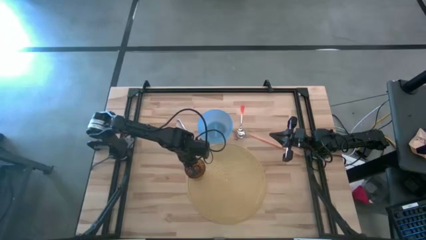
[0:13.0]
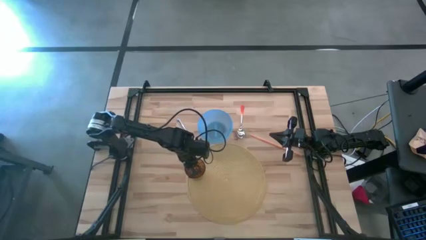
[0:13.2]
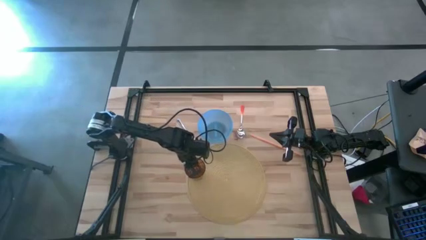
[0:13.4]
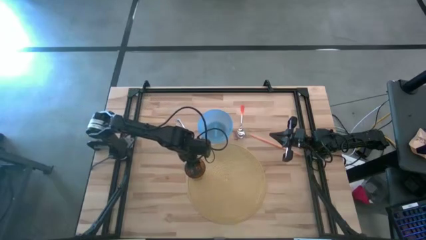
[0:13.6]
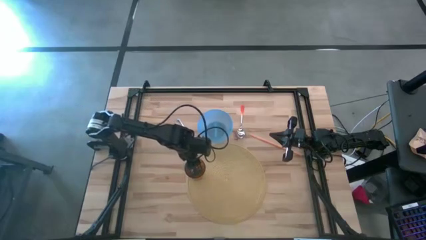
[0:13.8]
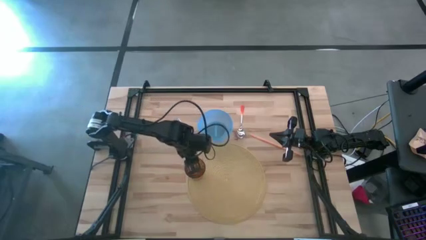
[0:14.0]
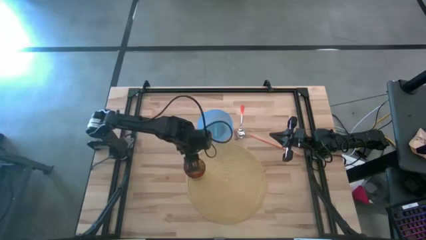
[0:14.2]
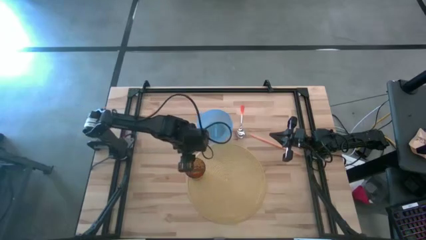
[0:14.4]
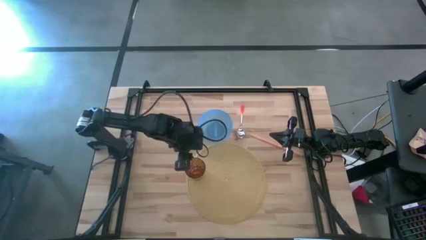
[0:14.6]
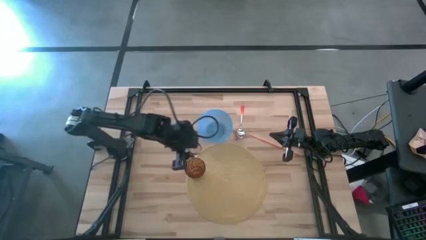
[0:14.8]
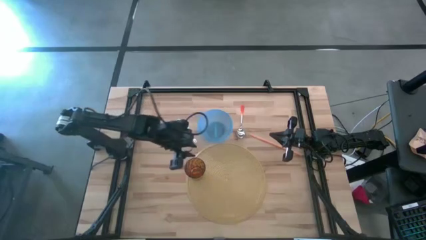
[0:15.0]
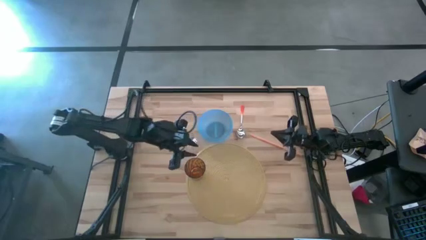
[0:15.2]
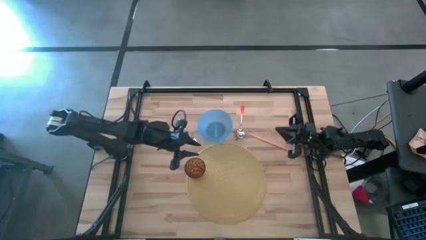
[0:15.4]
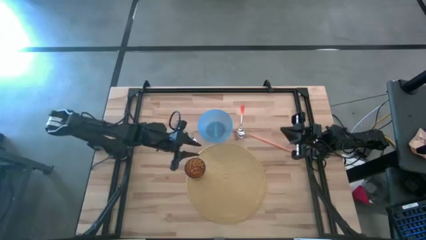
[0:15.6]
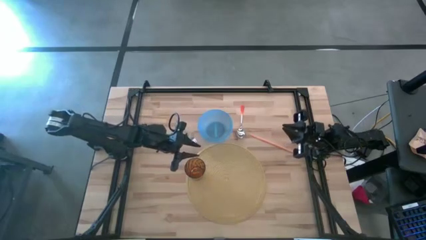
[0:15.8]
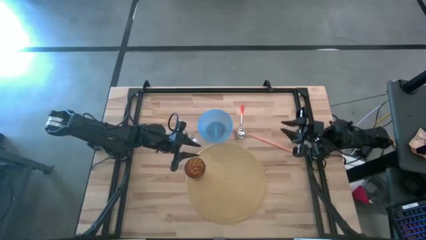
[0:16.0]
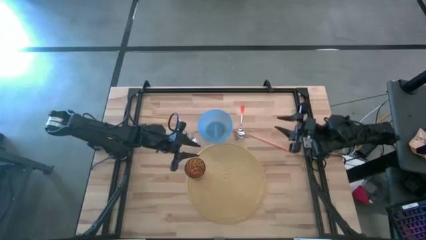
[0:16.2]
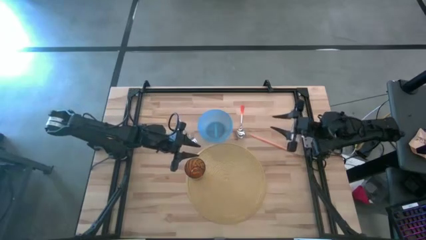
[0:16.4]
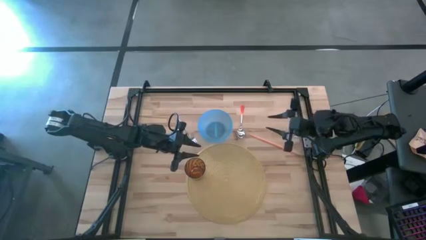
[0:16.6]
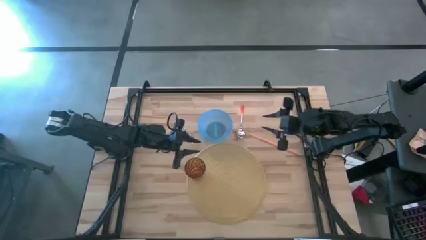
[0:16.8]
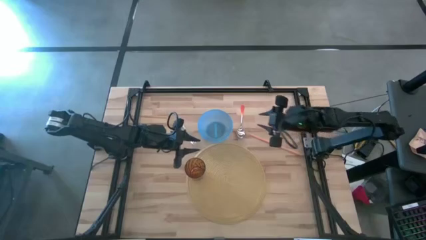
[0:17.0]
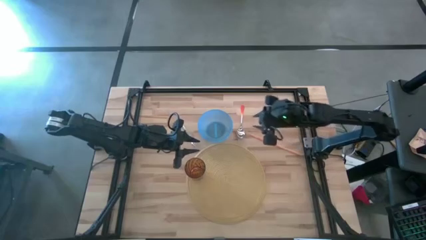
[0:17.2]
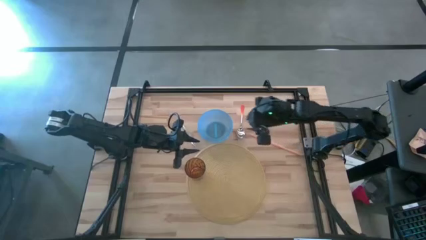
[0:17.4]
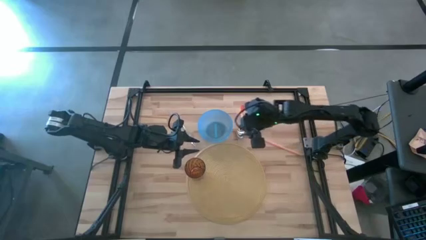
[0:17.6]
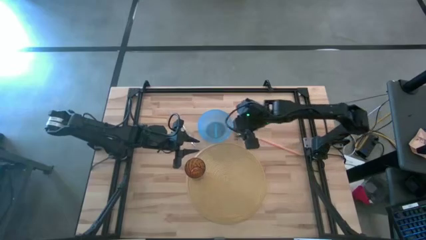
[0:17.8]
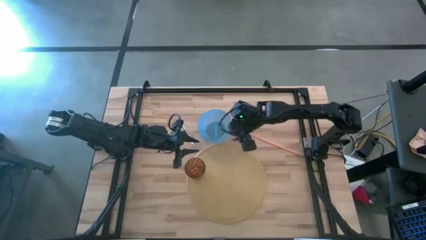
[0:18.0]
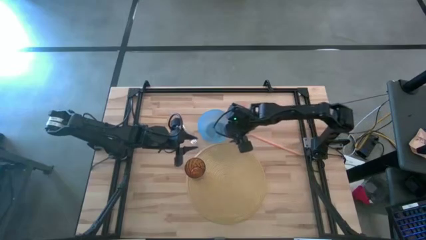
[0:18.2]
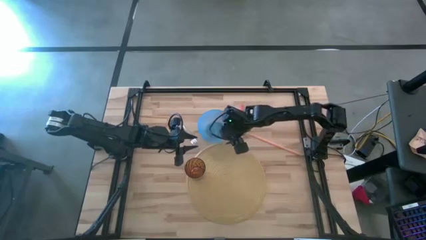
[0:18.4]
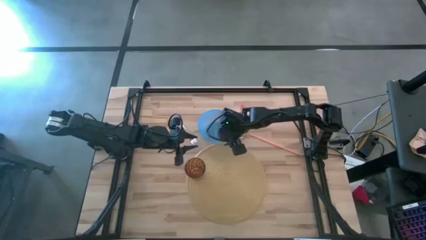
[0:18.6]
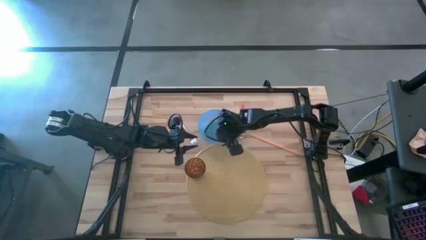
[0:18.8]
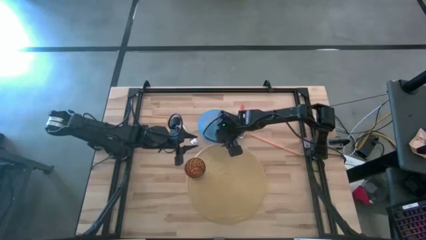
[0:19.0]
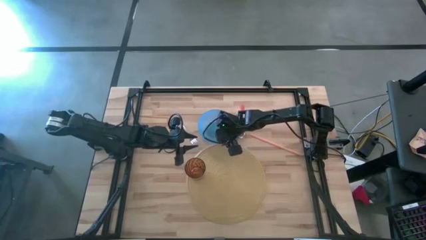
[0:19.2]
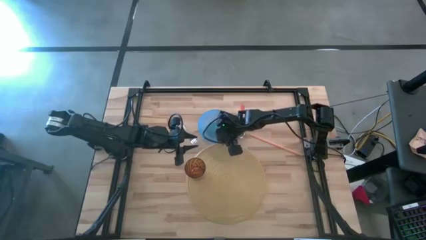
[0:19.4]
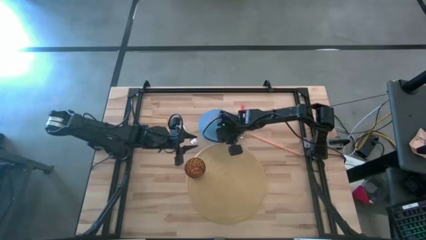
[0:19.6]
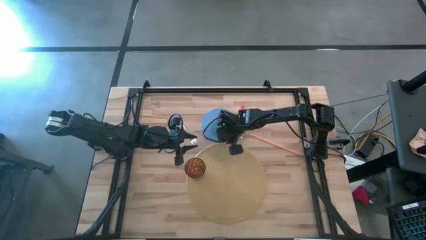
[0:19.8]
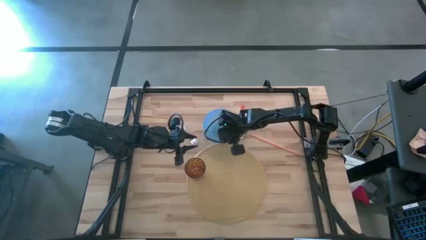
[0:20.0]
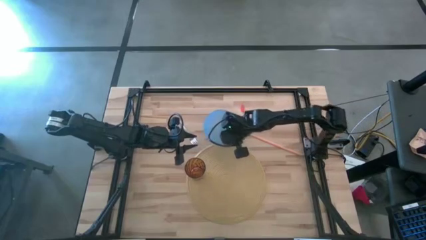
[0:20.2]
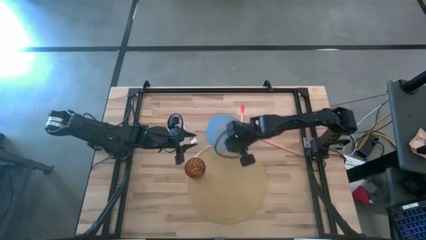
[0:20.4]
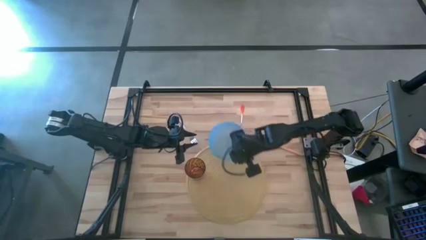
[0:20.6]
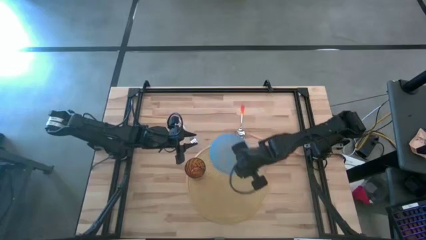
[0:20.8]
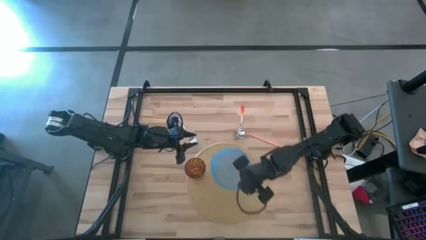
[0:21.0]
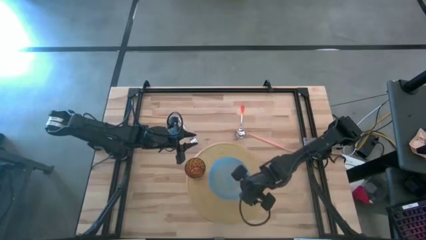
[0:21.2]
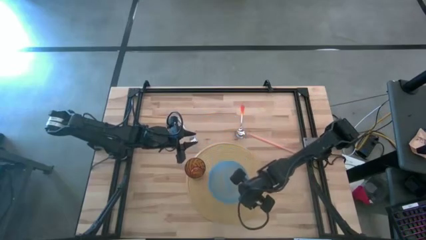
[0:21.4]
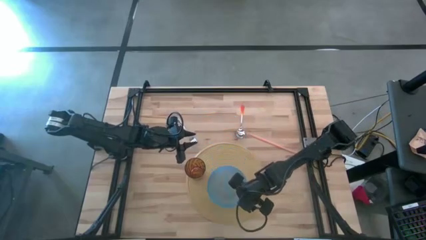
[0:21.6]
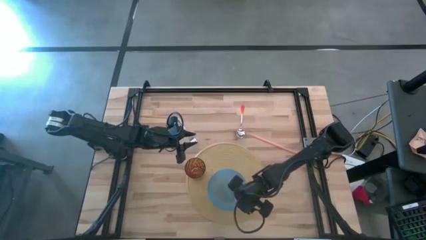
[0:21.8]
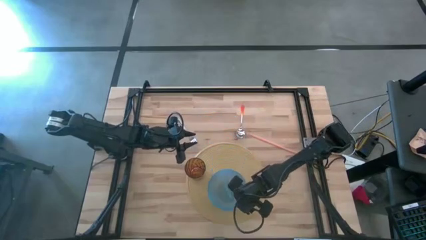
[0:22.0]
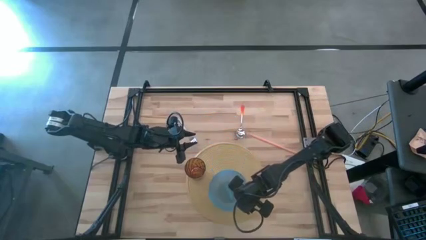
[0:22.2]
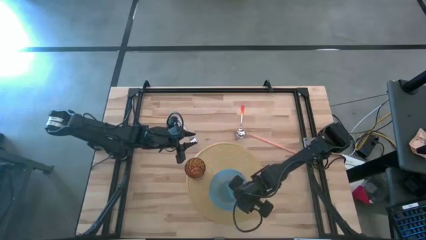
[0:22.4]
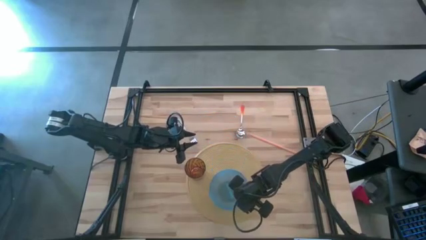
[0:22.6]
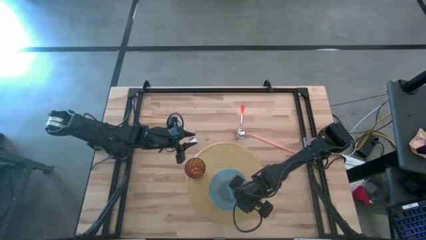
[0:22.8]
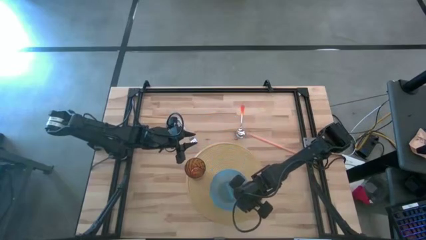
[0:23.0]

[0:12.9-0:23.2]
Task: Pick & Place Utensil
Put the blue bowl to the right of the orange cup on the brown mat
